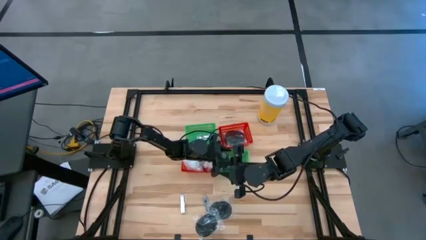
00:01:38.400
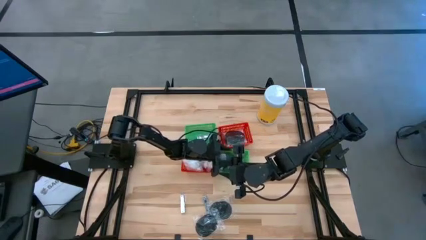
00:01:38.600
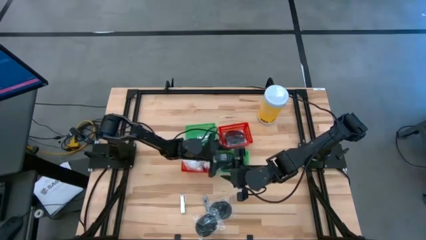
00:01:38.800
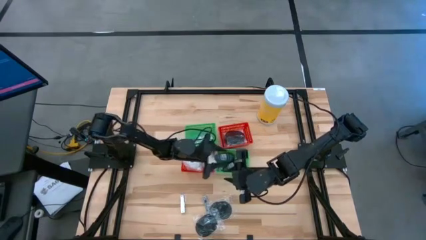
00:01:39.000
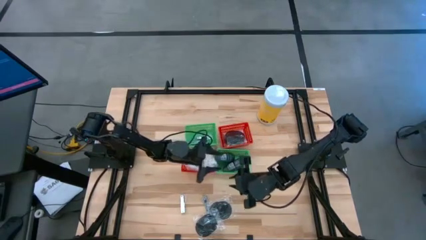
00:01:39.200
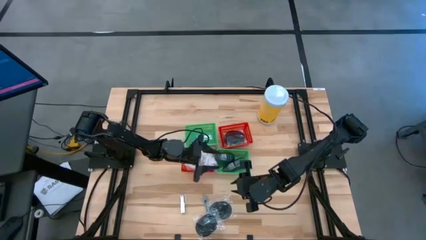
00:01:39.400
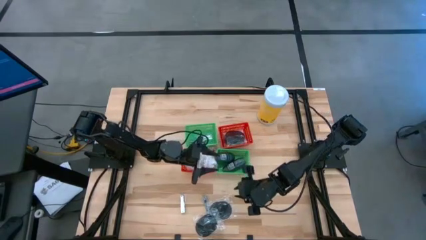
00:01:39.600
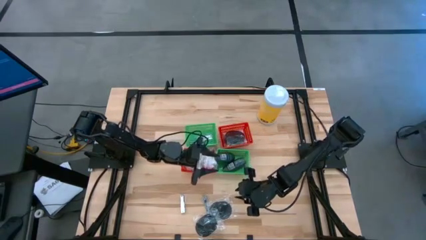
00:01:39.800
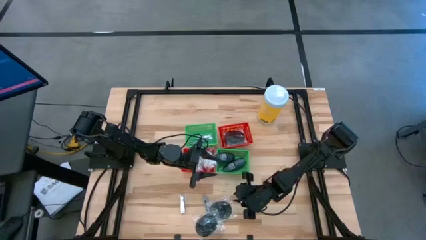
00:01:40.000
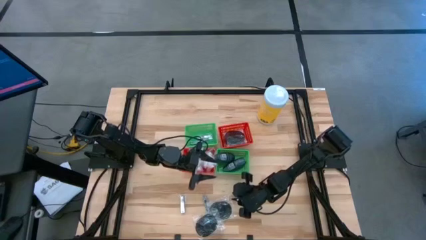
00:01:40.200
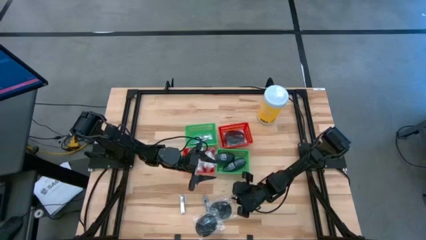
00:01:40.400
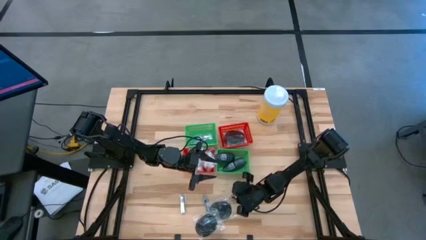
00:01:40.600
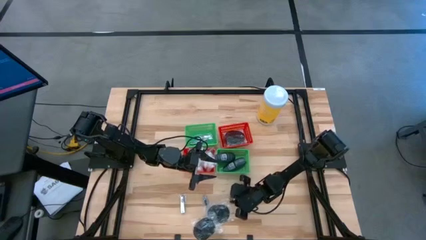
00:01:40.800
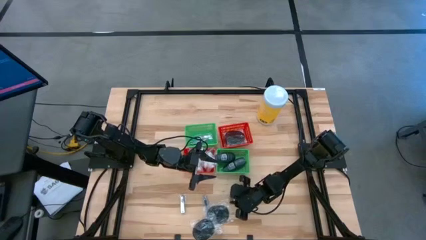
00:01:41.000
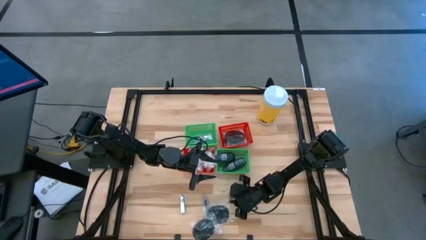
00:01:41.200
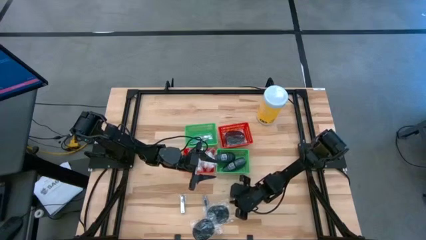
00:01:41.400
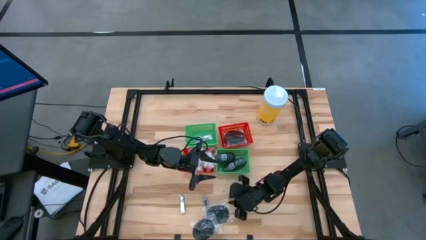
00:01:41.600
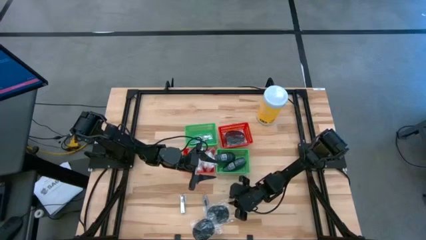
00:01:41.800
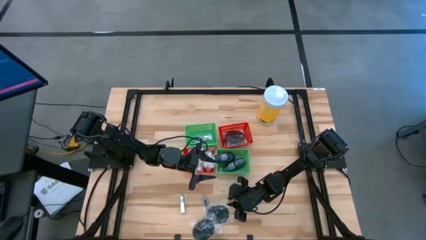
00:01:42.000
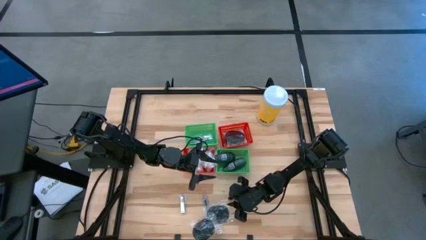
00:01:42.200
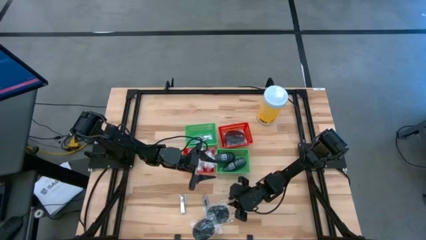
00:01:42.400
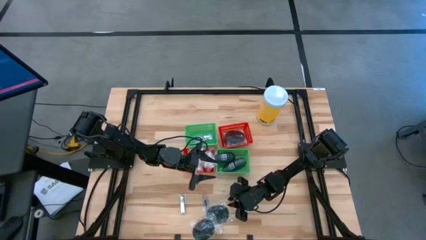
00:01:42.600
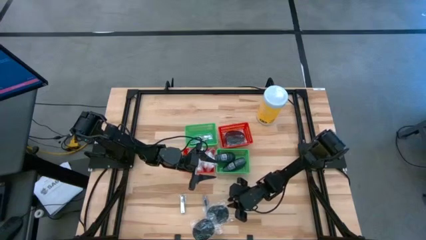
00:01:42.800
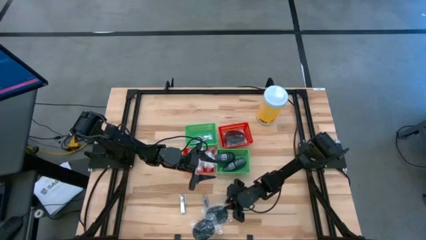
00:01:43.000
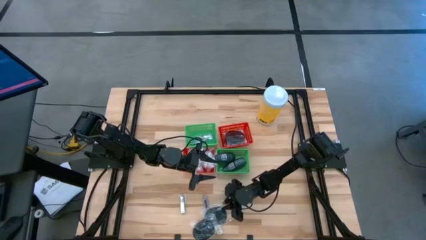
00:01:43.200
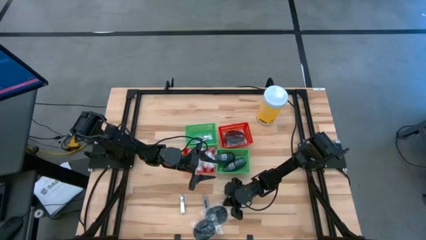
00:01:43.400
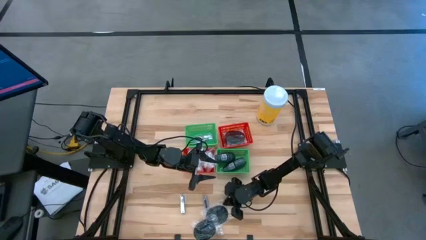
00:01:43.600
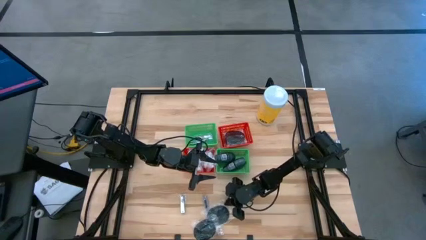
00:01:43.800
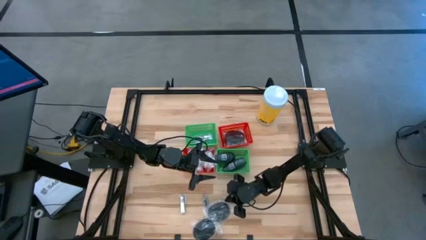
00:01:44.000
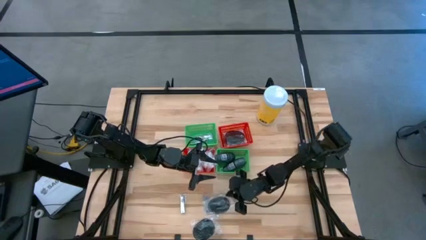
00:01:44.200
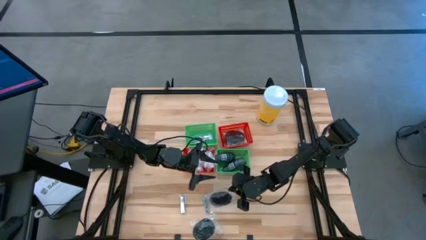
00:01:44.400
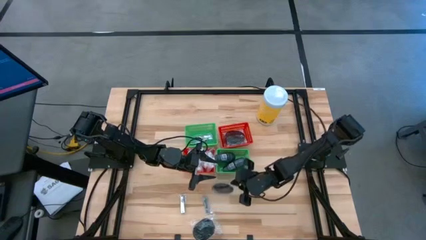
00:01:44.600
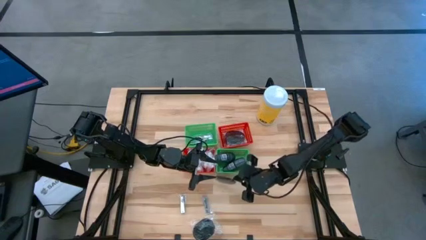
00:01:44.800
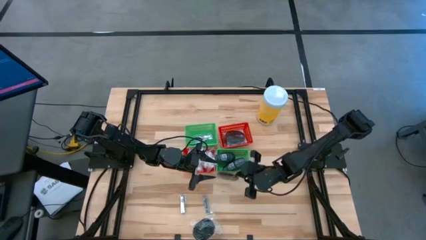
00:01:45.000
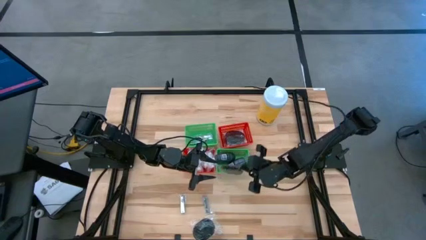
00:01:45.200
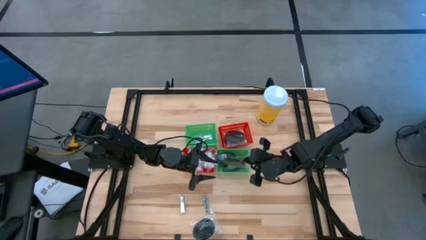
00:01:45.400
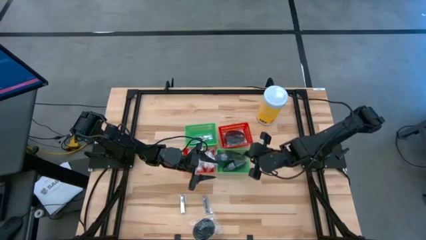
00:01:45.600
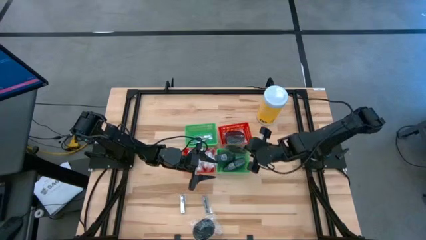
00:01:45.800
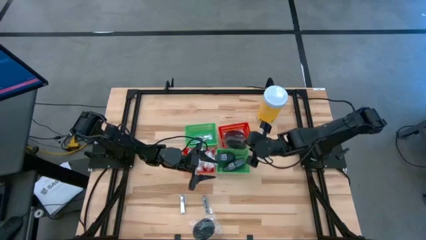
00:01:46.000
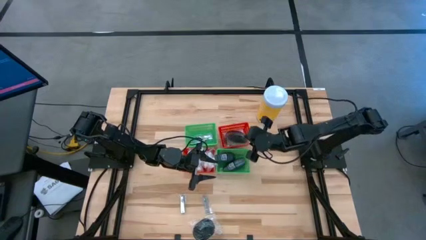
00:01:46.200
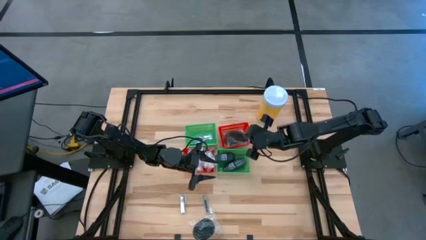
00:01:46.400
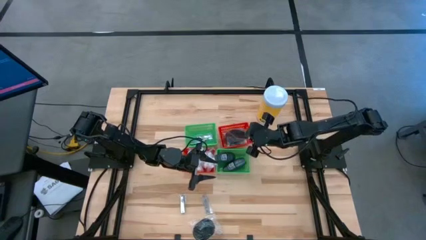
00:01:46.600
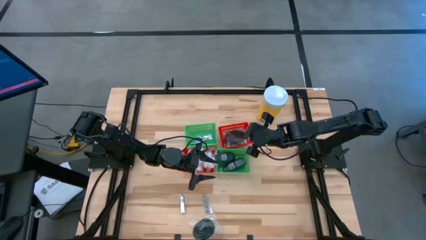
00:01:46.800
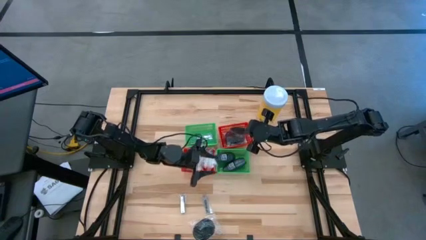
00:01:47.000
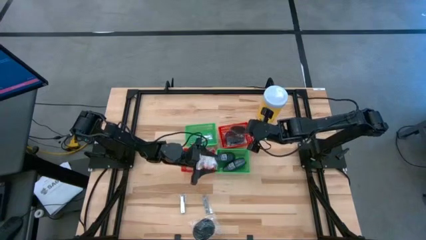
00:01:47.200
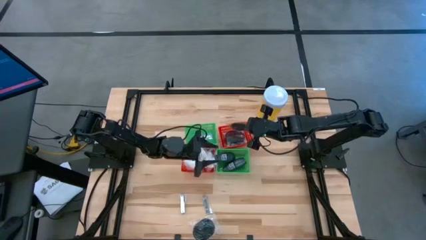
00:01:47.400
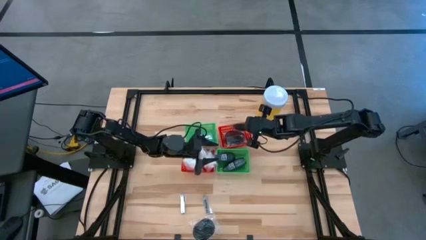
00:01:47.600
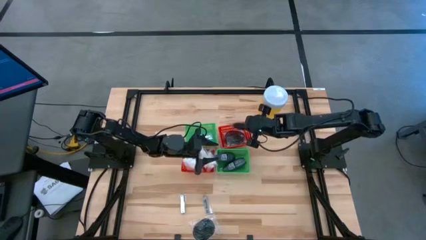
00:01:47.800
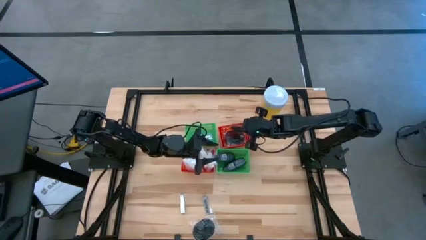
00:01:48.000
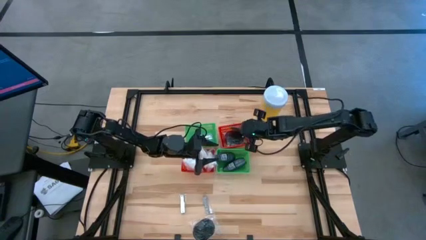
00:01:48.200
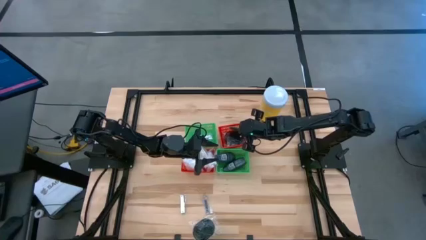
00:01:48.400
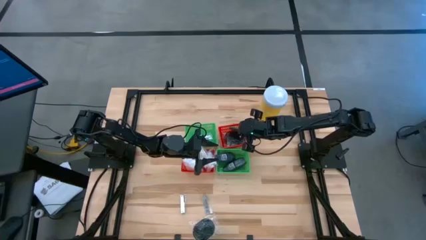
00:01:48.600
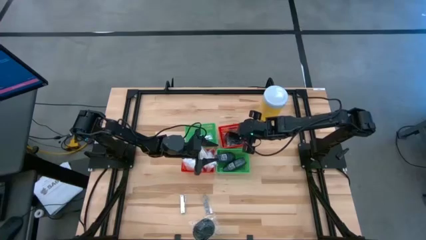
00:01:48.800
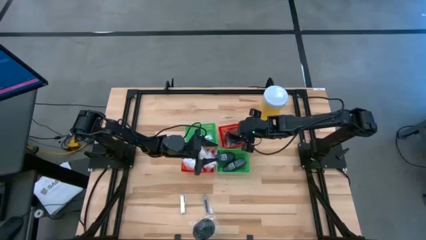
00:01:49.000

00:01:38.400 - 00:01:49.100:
Task: Pick & Place Travel size toiletries
Put the black hairbrush into the right red basket

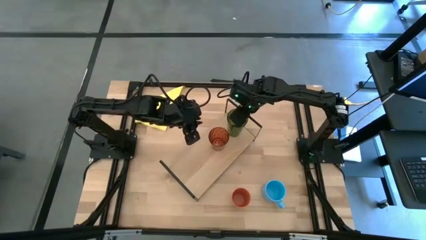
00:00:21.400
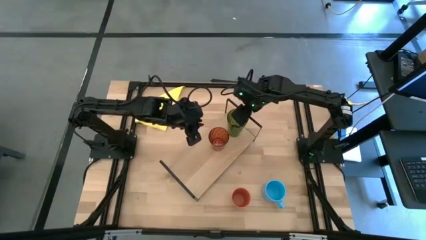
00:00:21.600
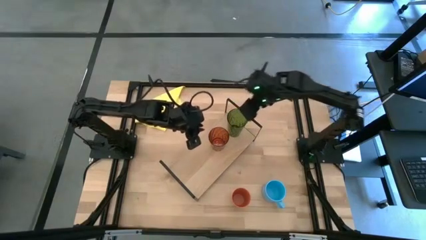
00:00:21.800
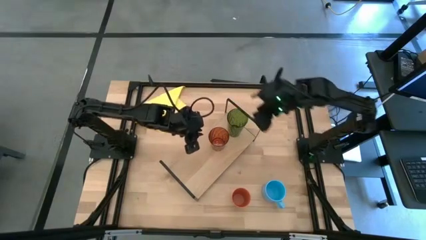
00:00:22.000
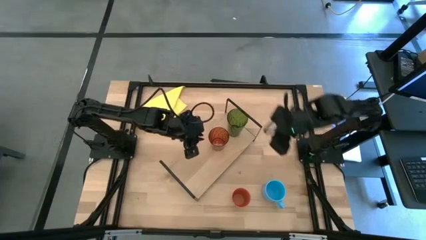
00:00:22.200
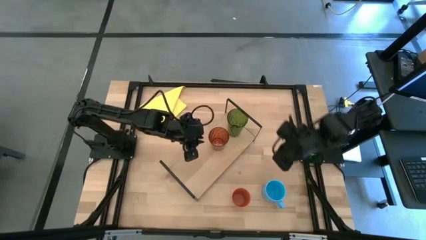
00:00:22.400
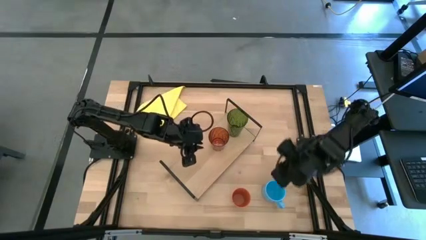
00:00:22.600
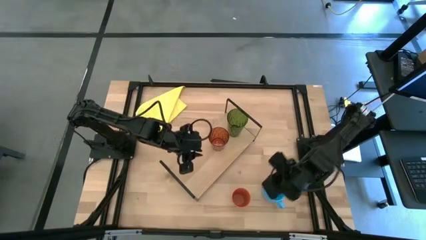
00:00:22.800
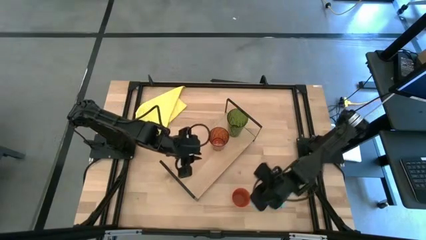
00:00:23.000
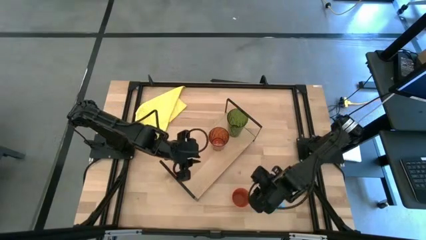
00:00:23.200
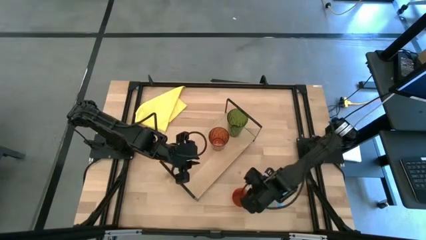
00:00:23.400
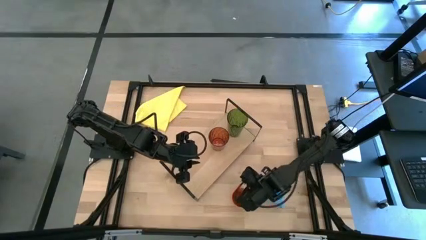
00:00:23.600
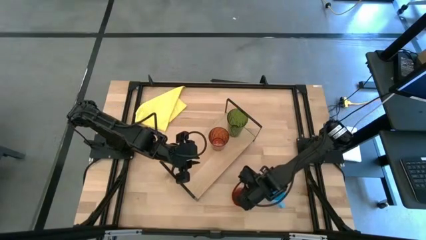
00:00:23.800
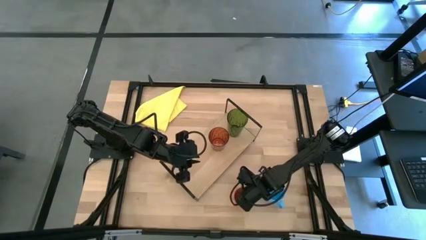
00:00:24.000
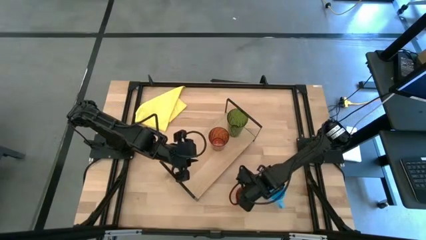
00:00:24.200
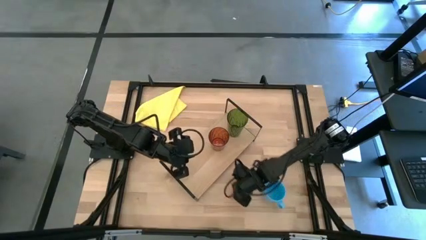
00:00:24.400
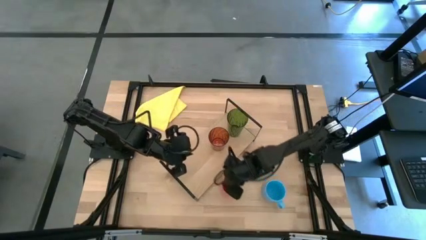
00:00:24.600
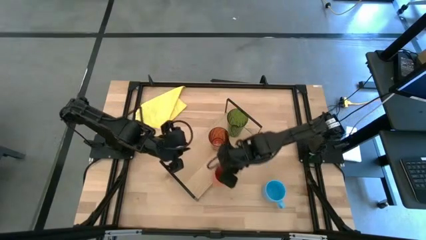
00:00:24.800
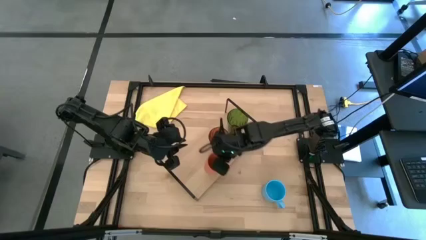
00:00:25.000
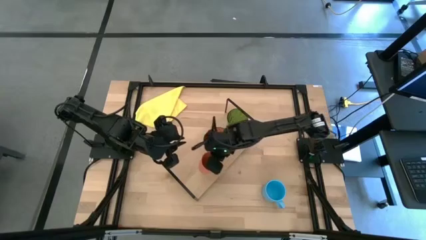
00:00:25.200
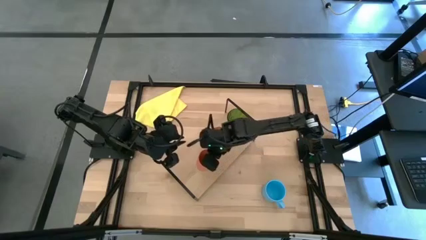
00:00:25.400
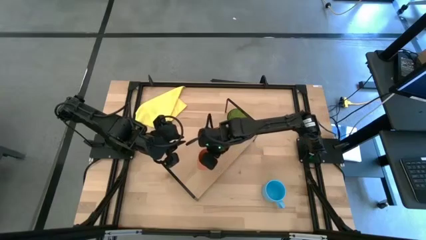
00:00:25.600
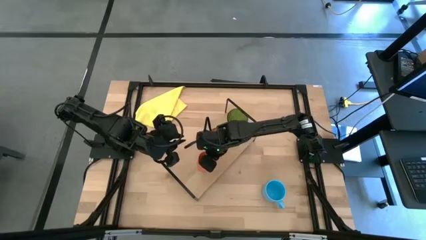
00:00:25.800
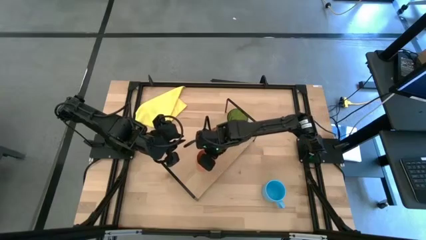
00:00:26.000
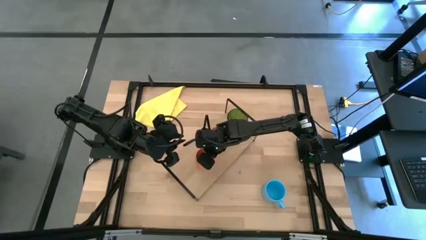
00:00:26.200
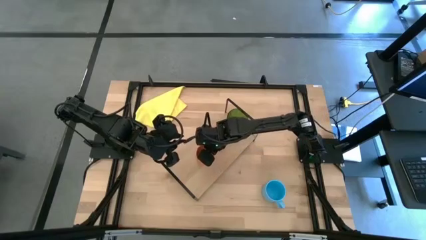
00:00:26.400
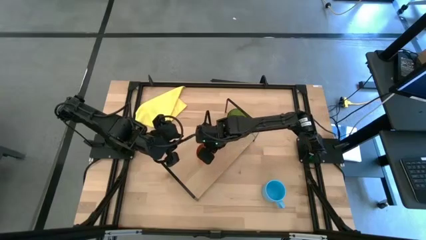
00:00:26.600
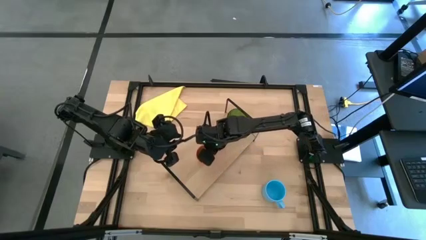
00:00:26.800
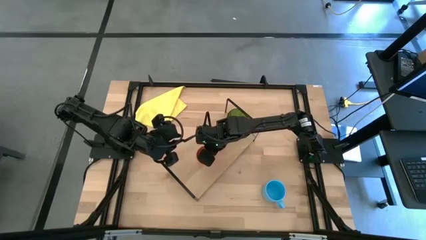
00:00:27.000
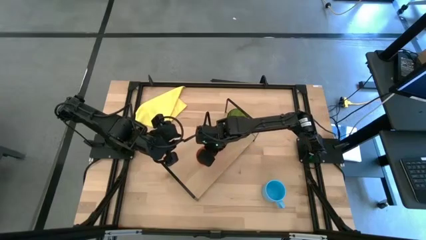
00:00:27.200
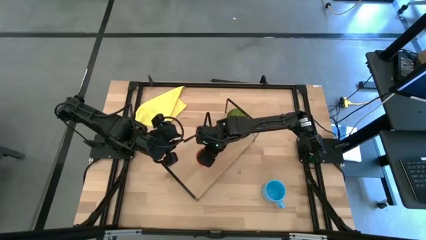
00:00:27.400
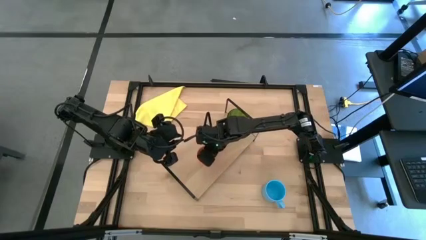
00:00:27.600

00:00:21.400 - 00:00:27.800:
Task: Stack small to large cups/mugs on shelf
Put the orange cup on the shelf
